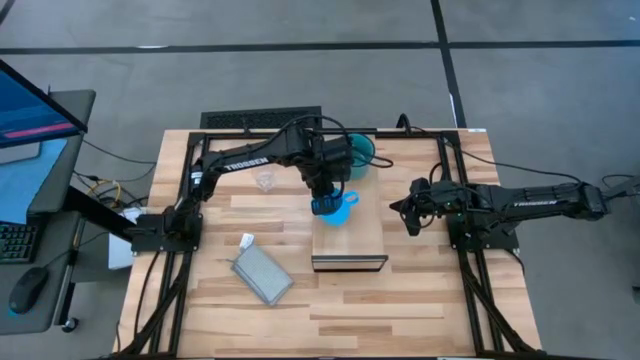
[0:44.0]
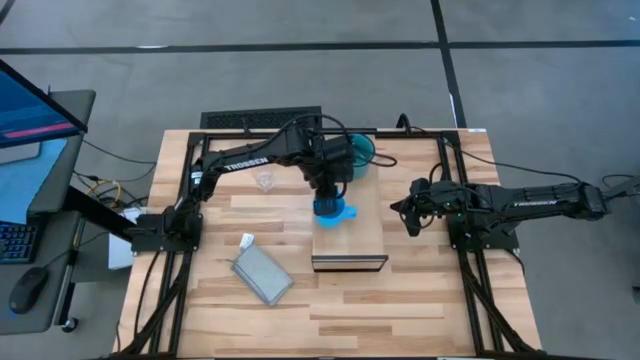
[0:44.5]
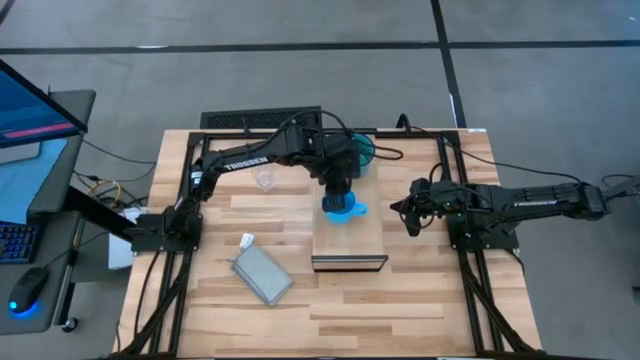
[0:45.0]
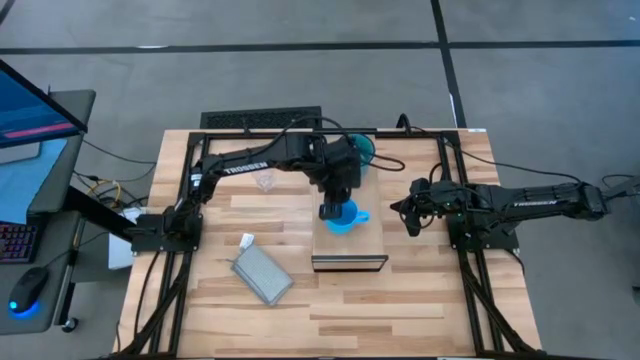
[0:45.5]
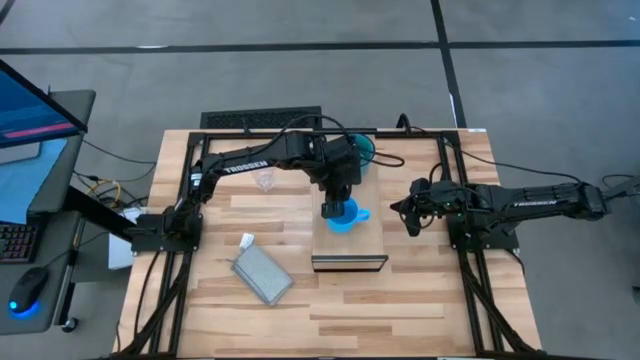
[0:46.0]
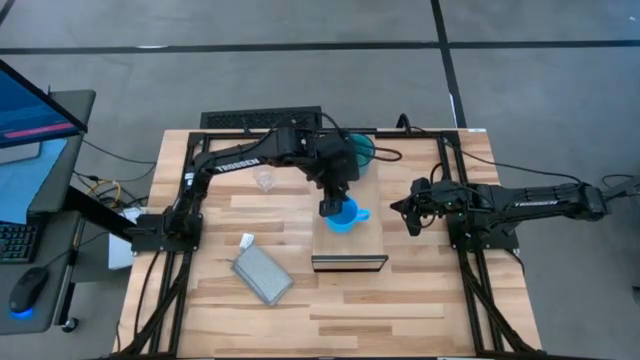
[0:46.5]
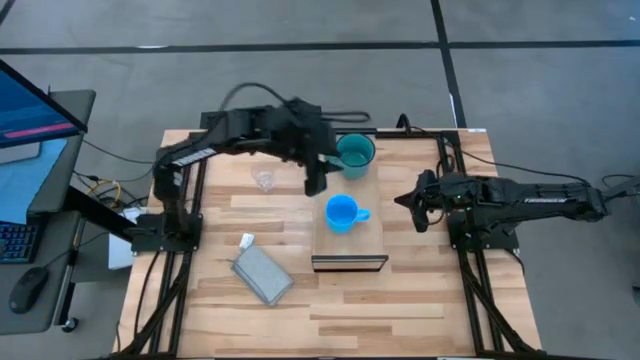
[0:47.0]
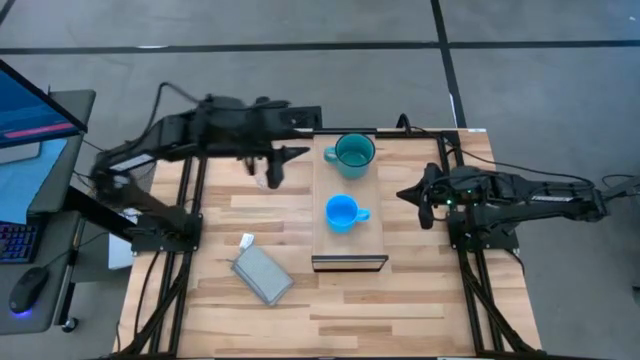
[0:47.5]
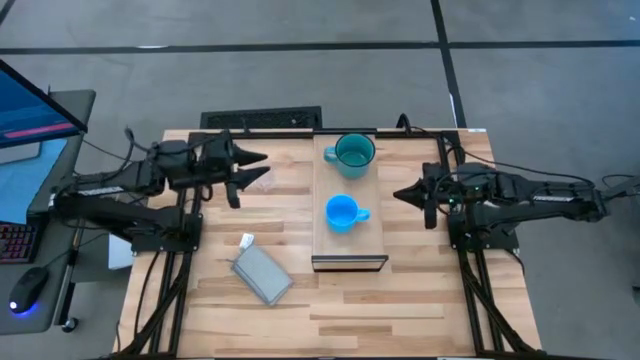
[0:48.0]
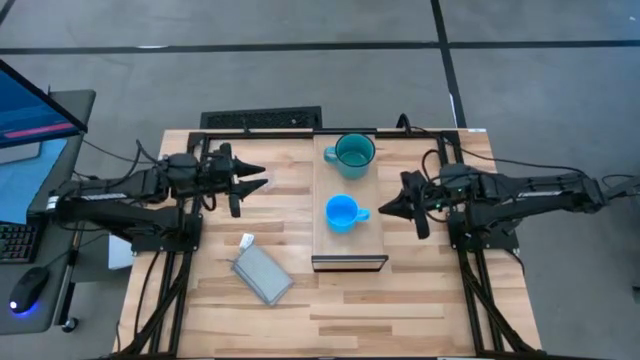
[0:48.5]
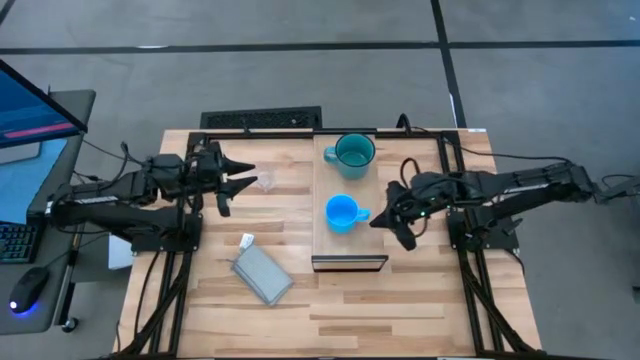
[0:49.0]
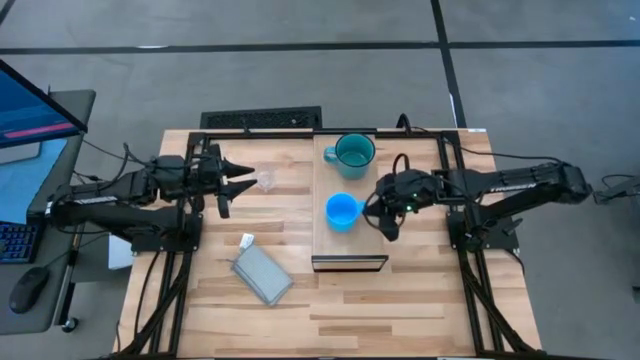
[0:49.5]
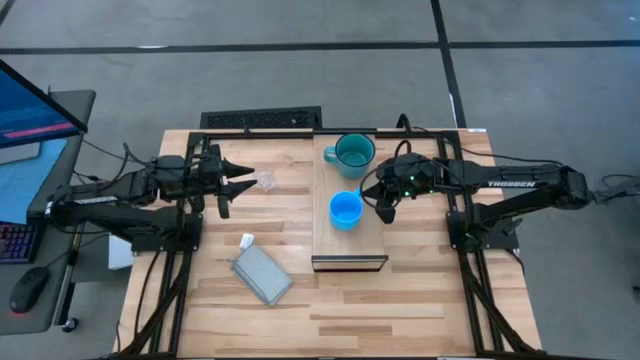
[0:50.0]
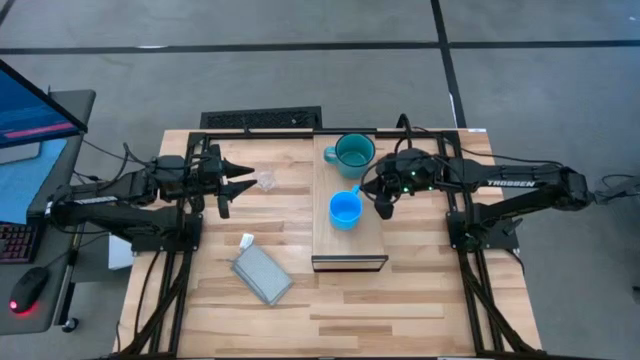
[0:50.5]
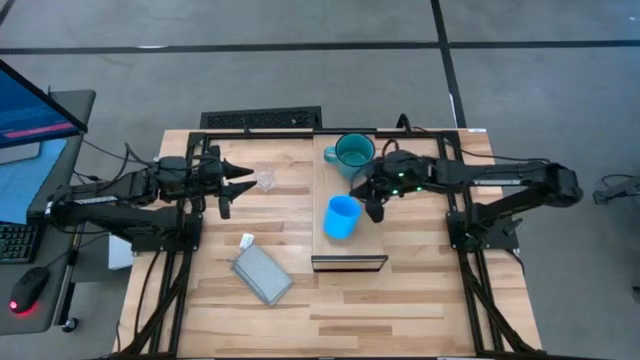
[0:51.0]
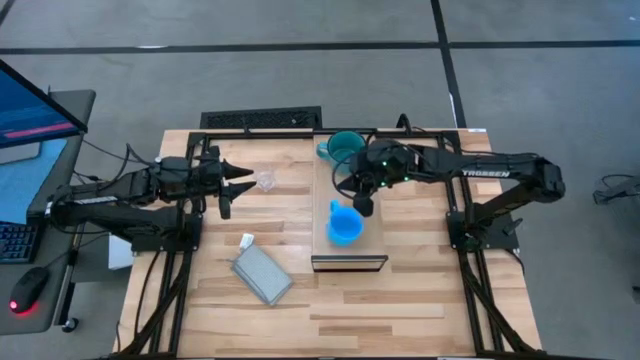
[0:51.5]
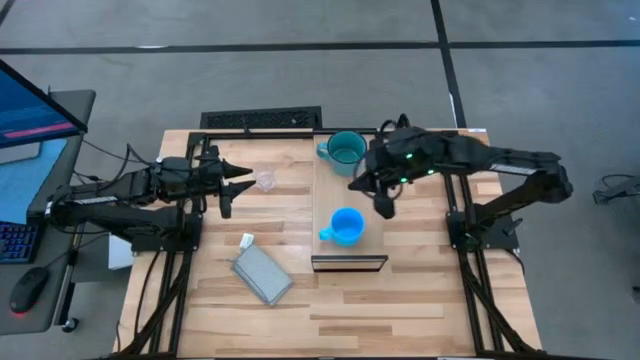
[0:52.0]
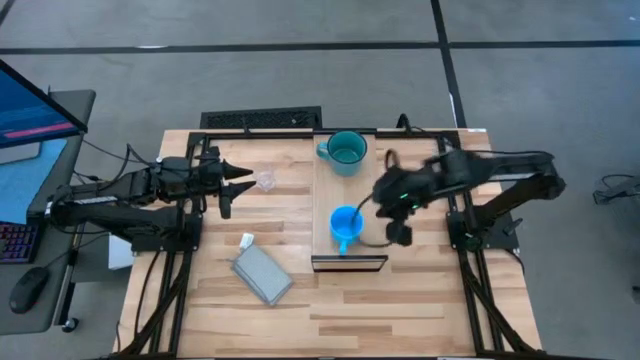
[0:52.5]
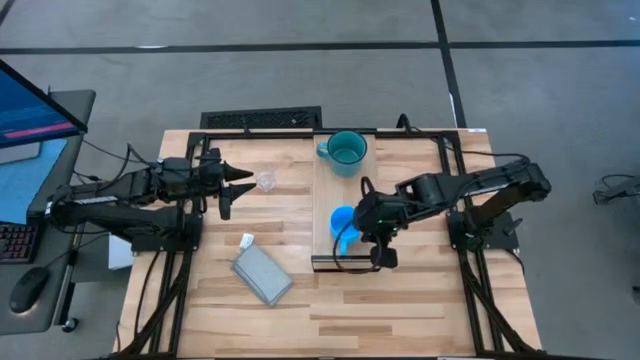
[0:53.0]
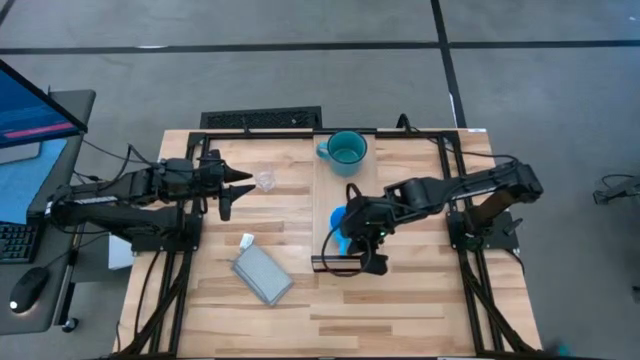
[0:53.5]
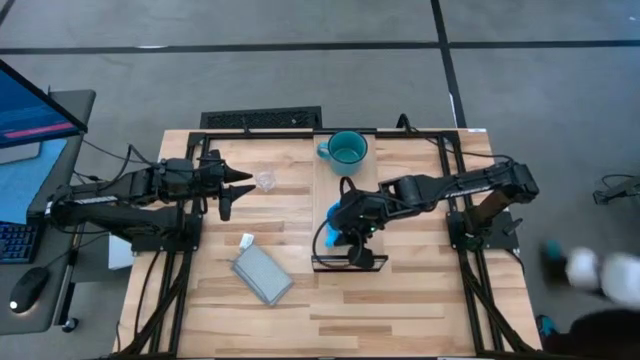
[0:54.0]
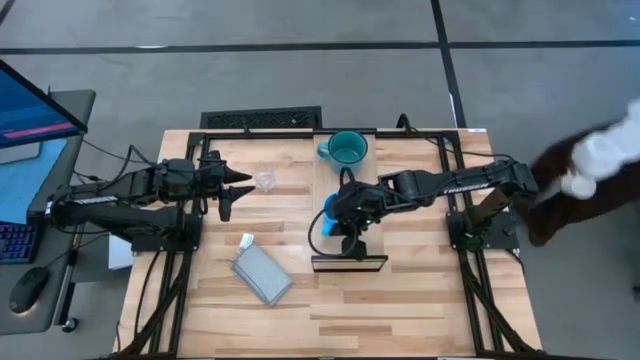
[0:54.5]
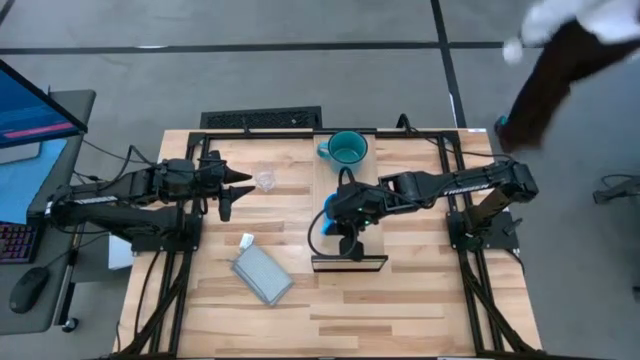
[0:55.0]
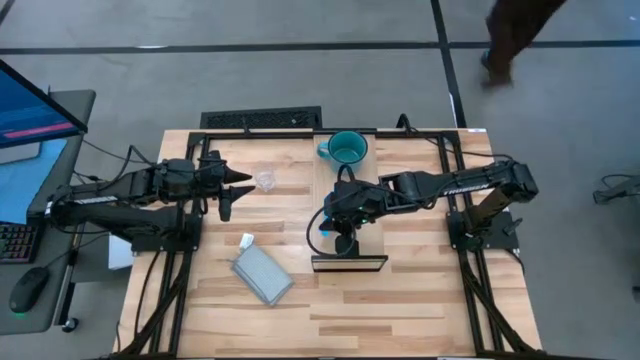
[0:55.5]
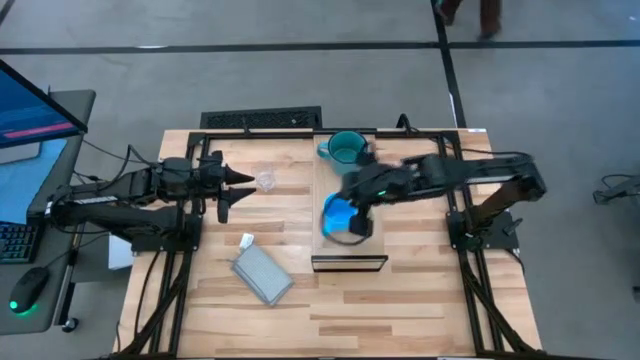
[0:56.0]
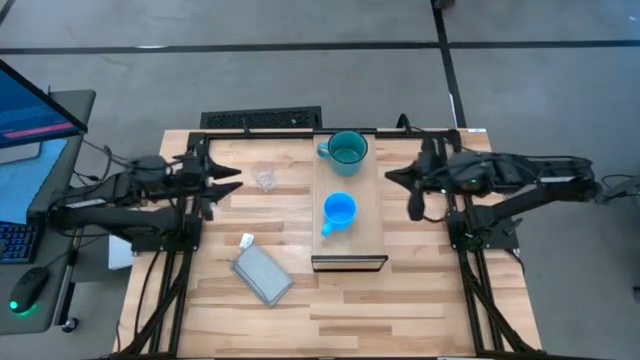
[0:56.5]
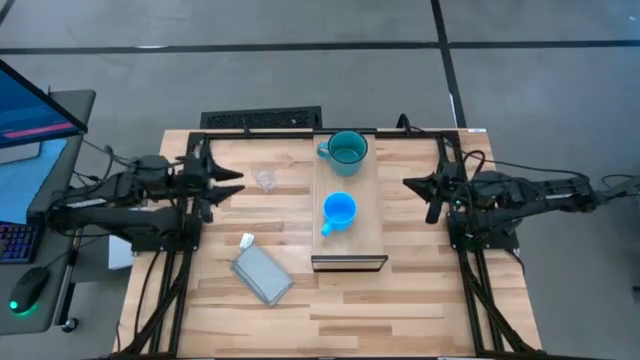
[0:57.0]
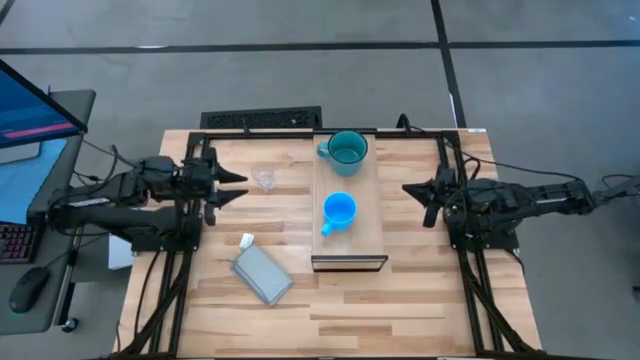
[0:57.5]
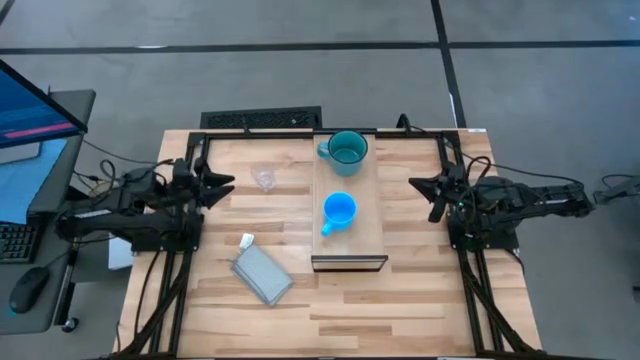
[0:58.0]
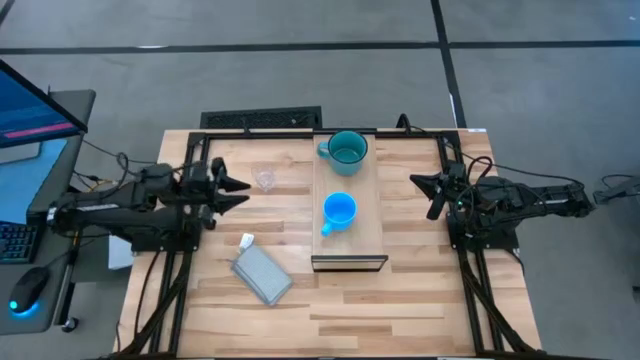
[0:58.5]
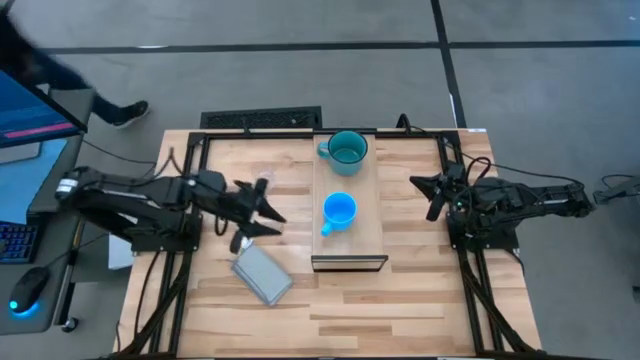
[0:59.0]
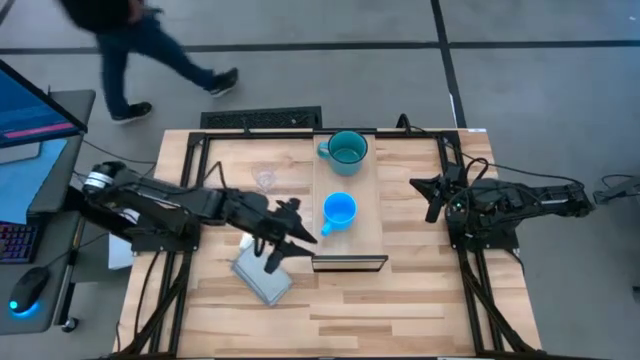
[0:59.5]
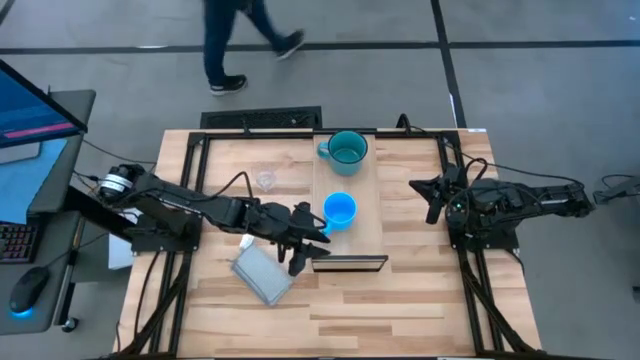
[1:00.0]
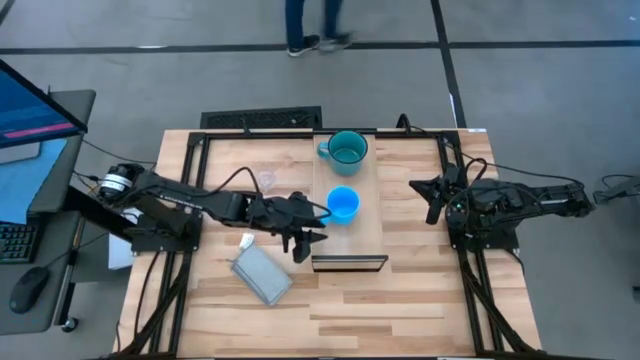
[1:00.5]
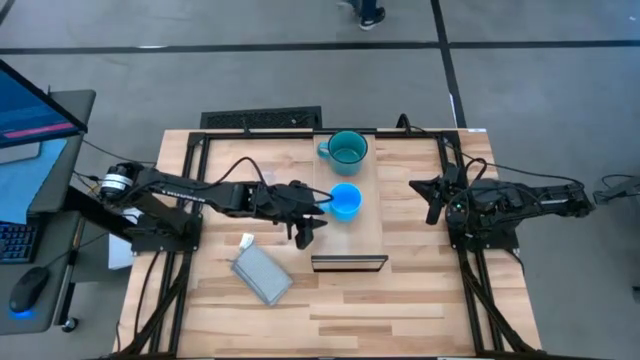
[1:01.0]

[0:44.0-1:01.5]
Task: Stack small to large cups/mugs on shelf
Put the light blue mug on the shelf
